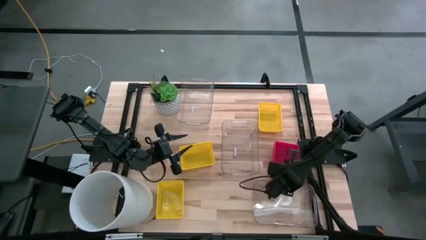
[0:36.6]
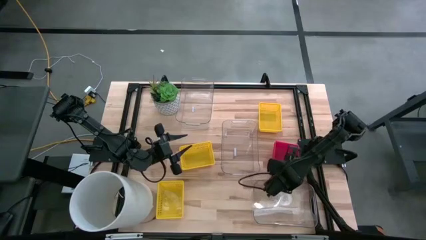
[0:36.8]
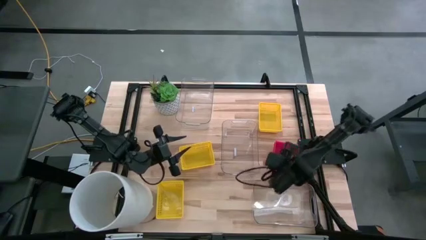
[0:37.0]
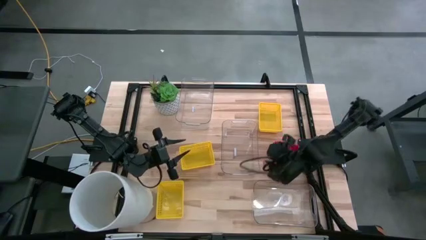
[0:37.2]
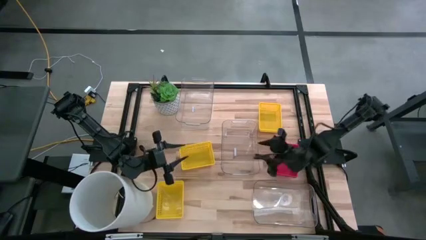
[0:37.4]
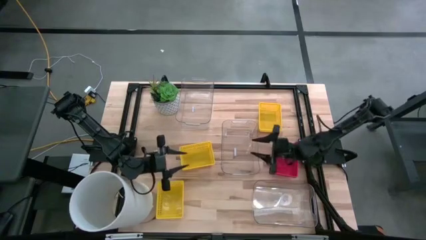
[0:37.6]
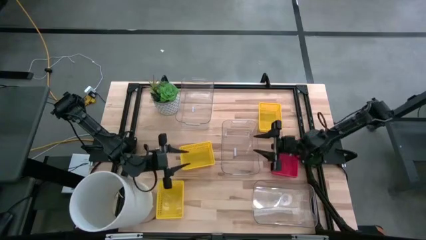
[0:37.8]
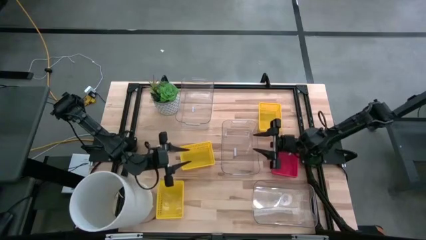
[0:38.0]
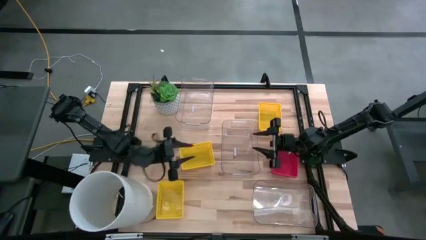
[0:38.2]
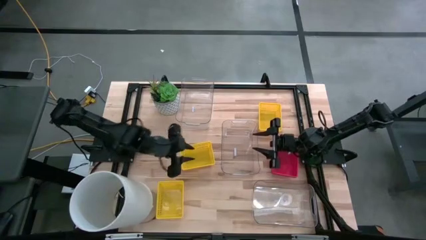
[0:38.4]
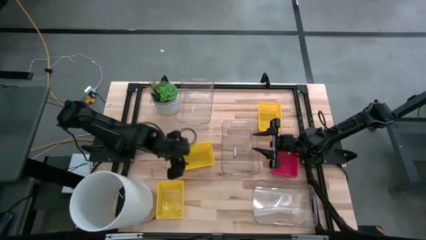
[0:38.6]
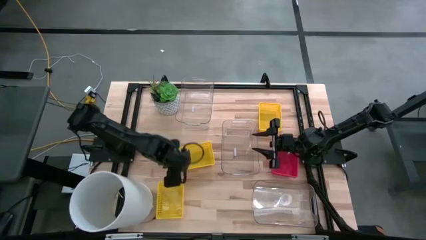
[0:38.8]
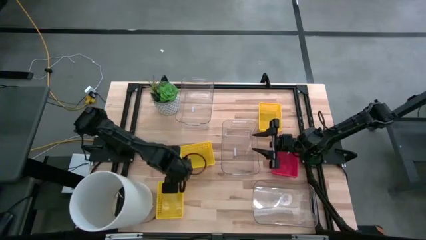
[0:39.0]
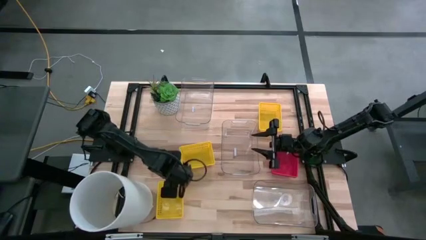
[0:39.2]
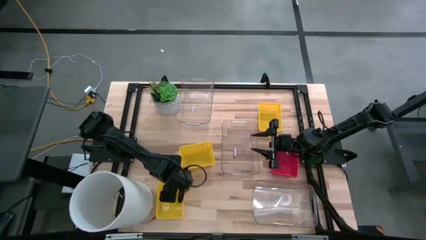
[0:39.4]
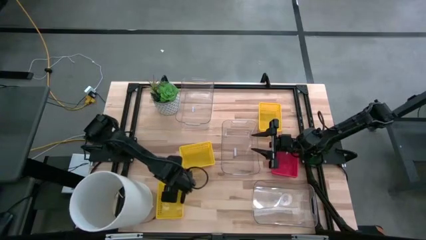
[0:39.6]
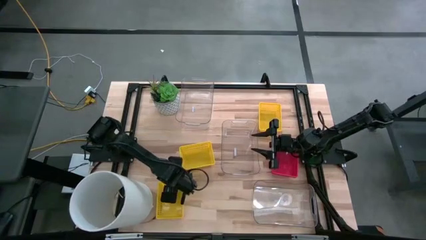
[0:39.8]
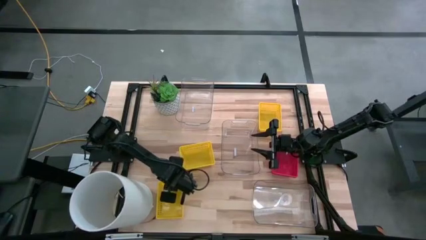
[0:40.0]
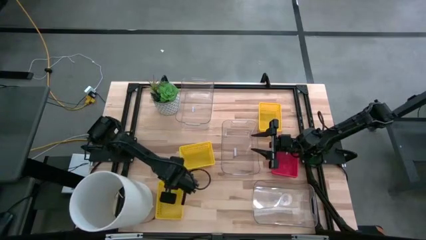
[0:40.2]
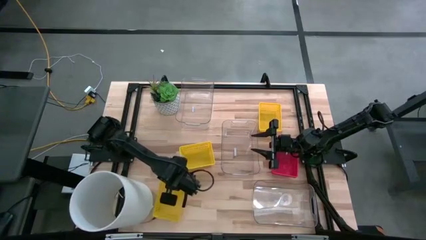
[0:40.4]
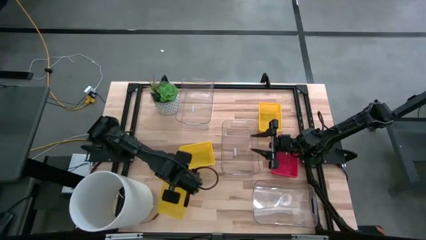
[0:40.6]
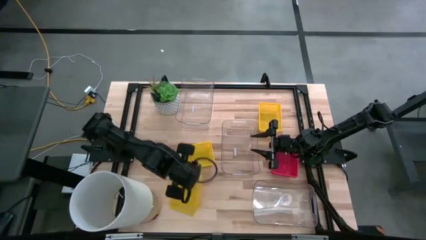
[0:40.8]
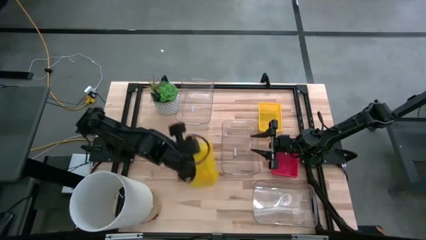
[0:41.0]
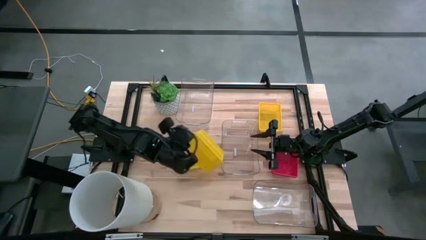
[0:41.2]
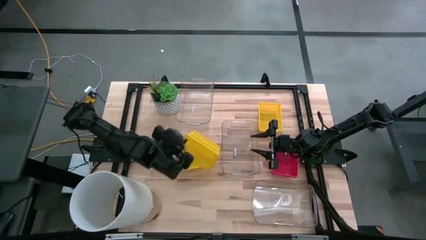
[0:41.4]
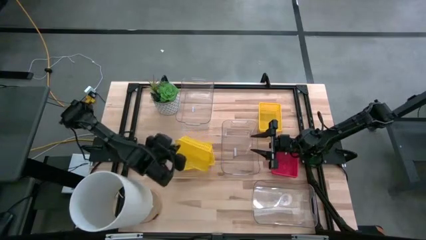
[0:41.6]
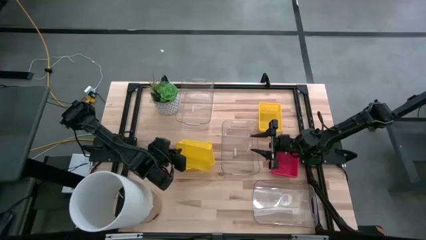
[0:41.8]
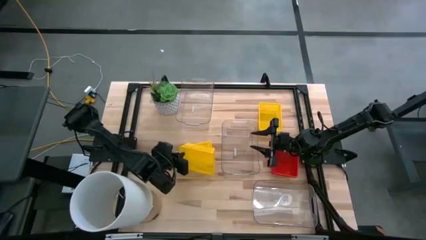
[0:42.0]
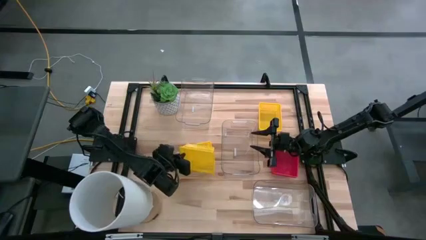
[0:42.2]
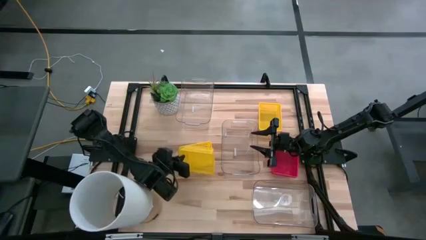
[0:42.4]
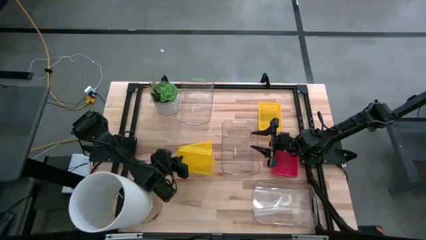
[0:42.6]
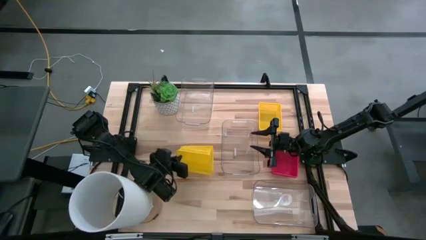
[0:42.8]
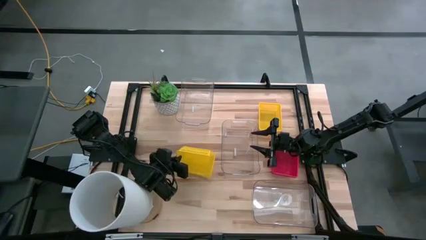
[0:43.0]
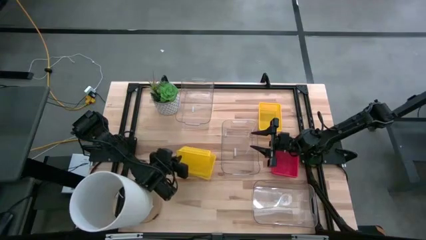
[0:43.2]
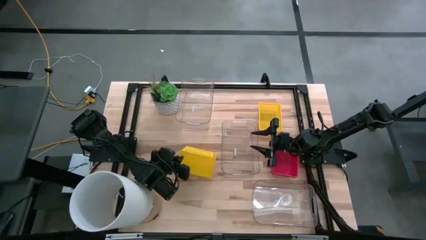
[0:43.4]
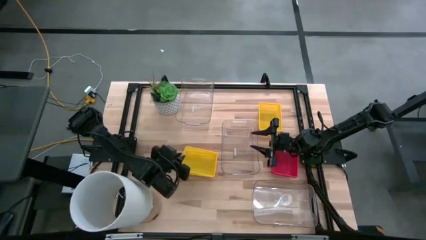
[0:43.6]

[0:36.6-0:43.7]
Stack the bottom yellow bin on the middle yellow bin

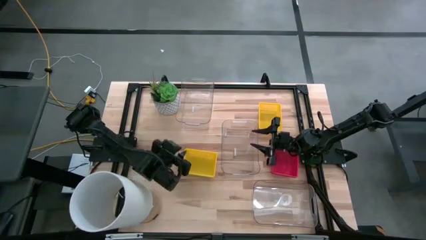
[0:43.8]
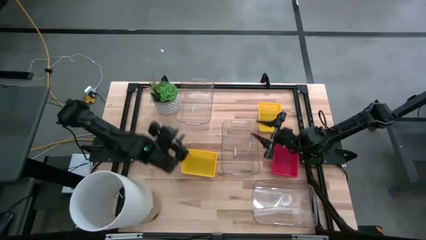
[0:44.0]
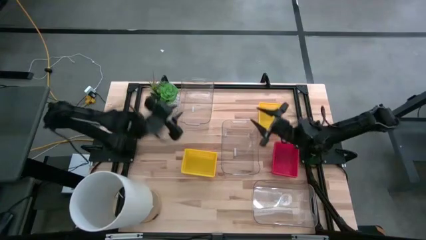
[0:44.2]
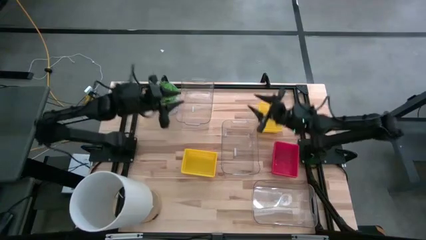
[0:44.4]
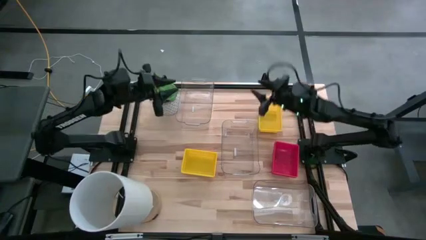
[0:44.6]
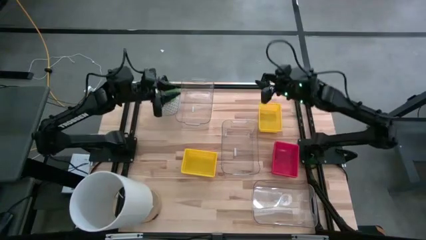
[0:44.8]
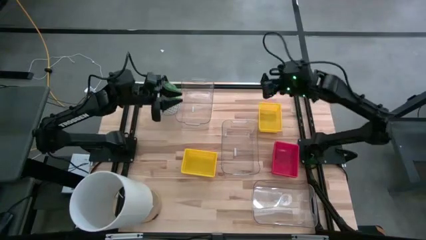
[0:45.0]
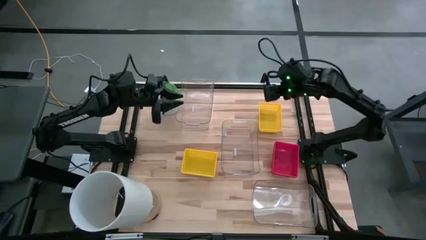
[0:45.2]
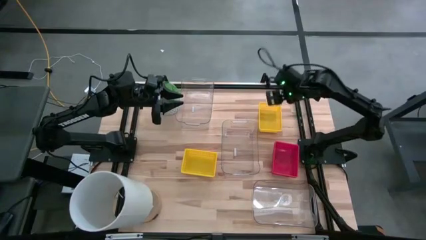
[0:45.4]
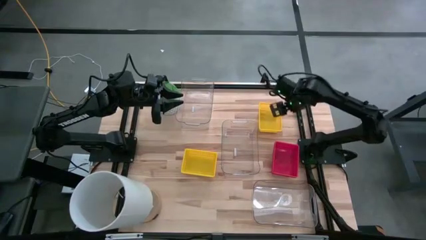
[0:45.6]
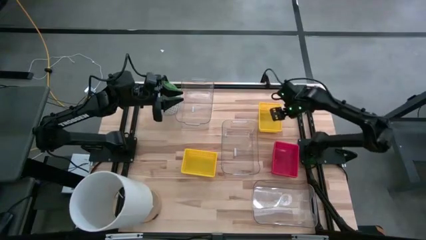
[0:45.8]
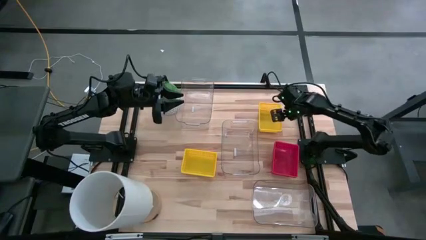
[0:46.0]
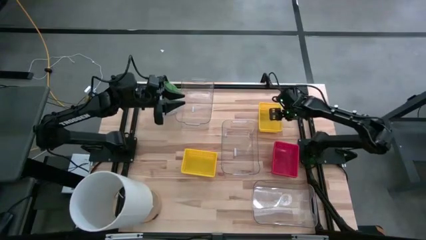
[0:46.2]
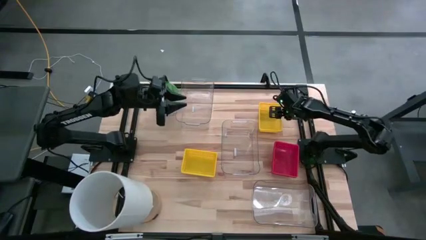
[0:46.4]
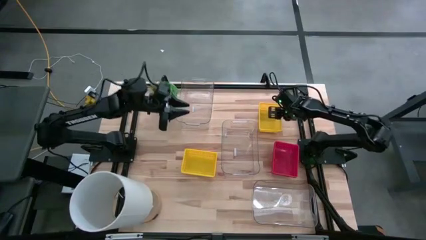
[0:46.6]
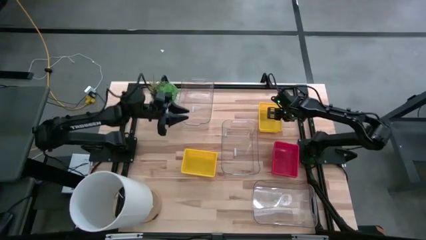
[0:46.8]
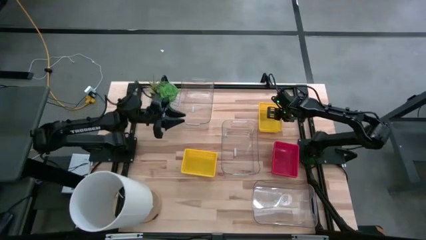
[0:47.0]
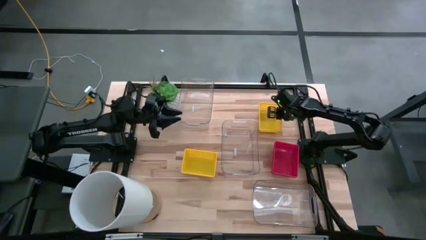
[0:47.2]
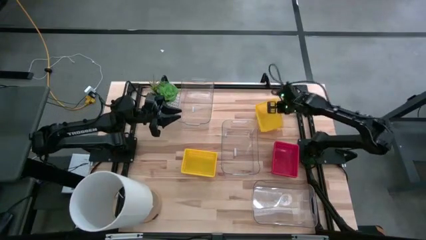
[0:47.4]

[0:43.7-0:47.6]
Stack the top yellow bin on the stacked yellow bin

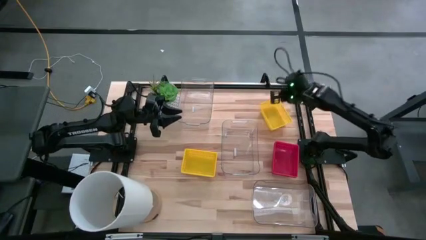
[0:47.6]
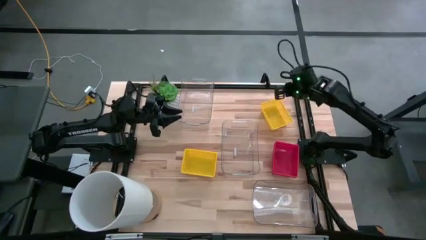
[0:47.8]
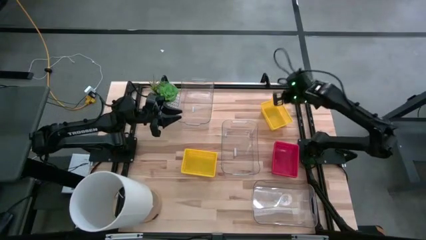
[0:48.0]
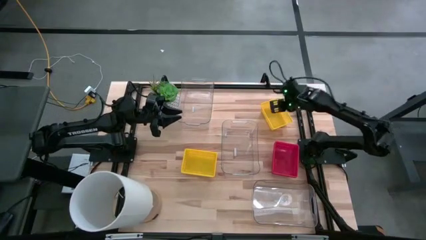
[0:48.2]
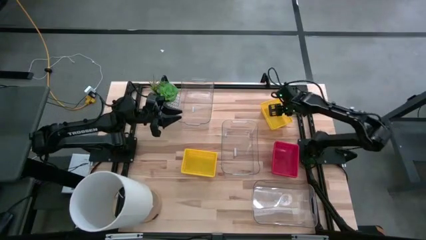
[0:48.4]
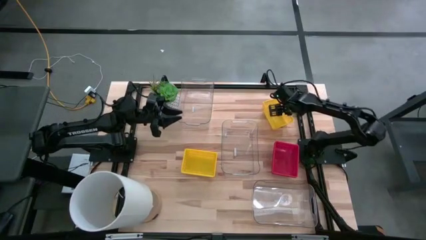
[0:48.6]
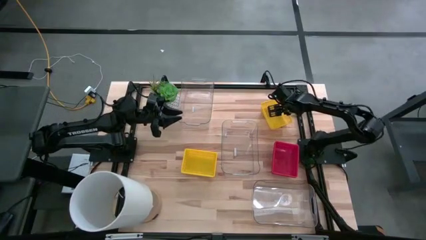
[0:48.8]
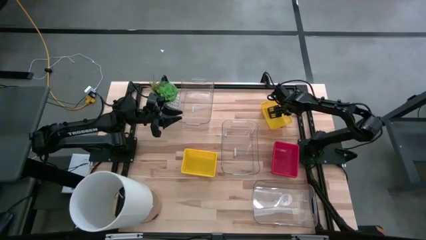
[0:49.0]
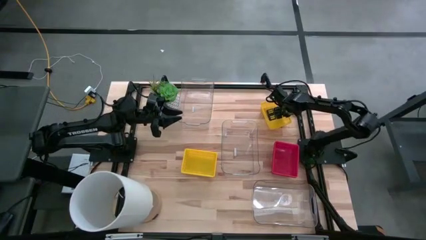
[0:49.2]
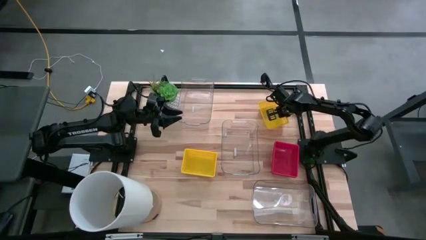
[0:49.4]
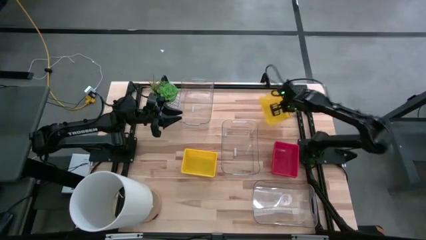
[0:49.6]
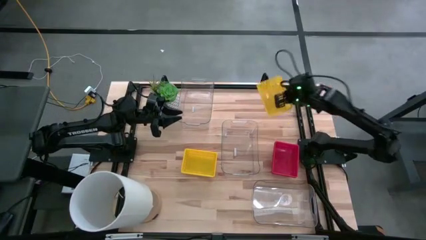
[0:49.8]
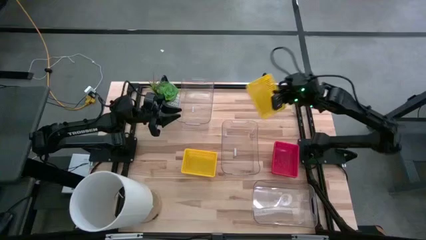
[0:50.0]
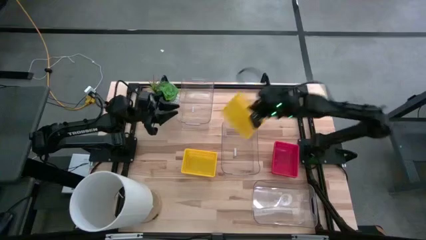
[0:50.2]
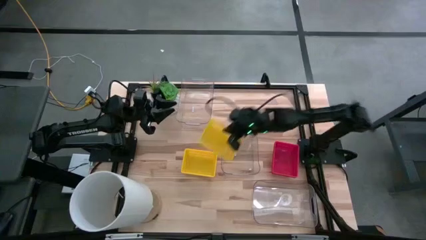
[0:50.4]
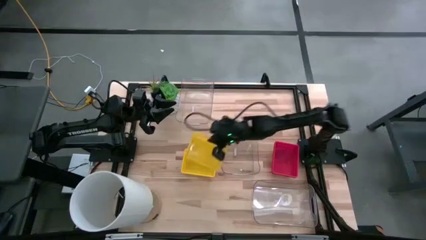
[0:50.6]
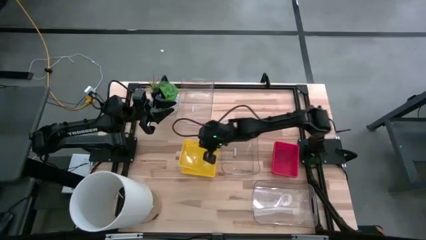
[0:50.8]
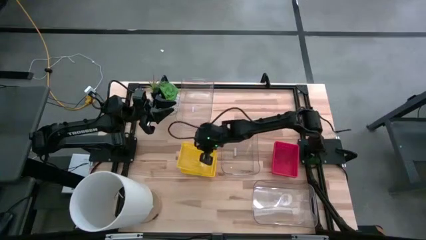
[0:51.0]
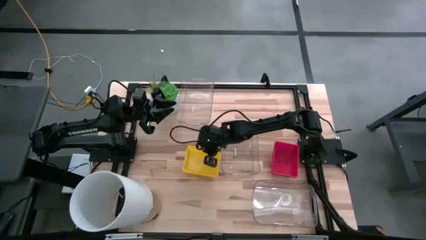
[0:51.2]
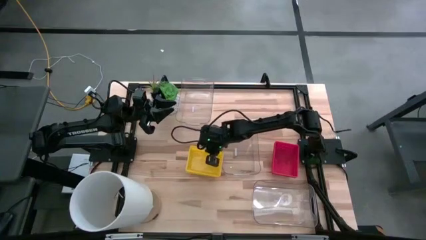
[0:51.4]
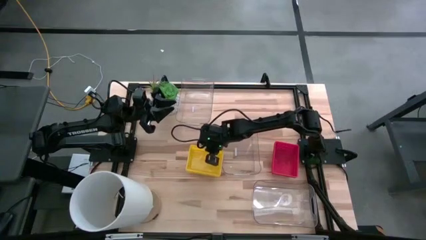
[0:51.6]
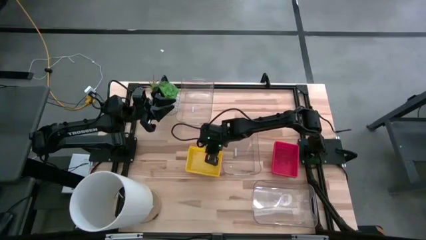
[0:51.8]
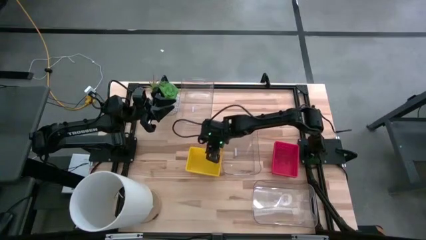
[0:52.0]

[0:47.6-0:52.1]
Stack the top yellow bin on the stacked yellow bin
